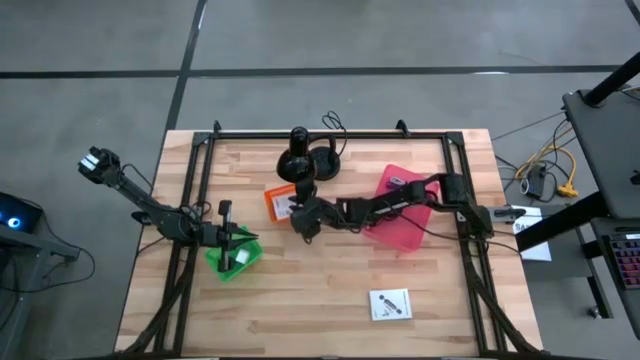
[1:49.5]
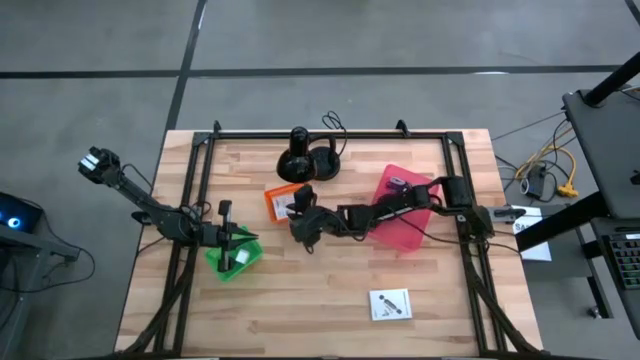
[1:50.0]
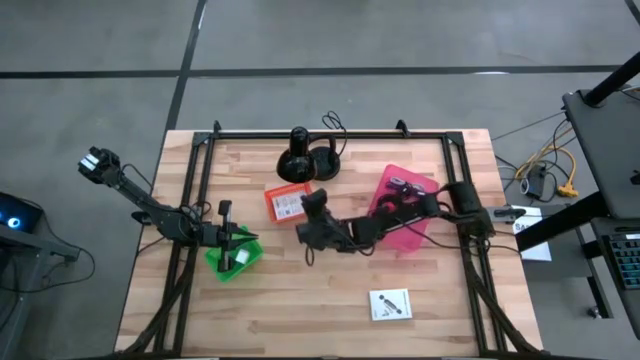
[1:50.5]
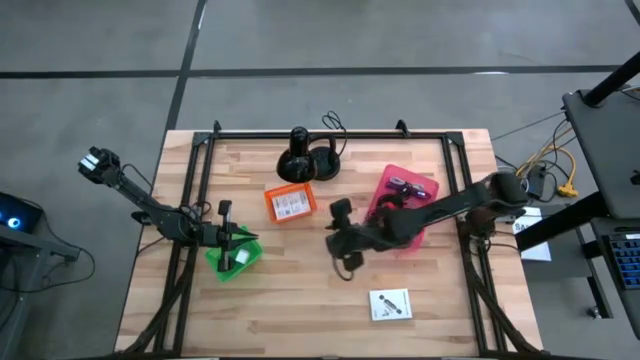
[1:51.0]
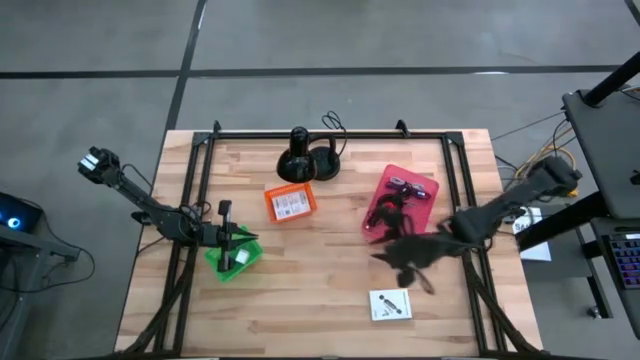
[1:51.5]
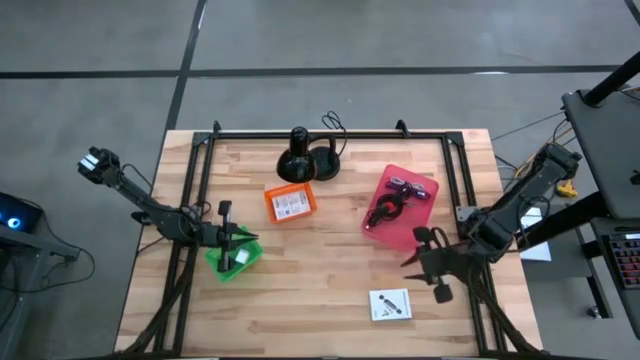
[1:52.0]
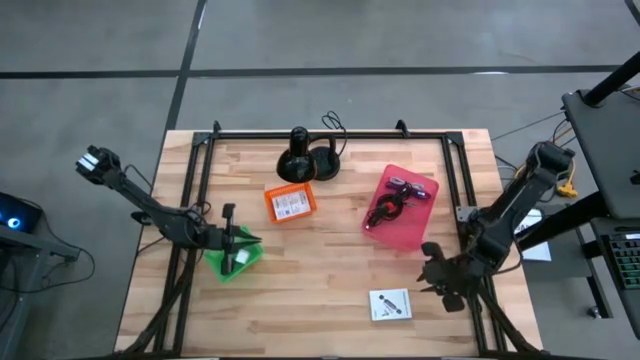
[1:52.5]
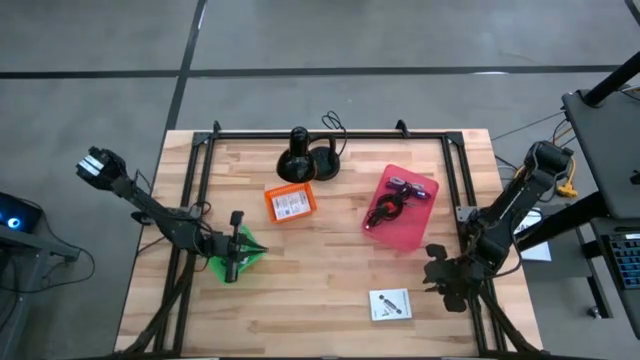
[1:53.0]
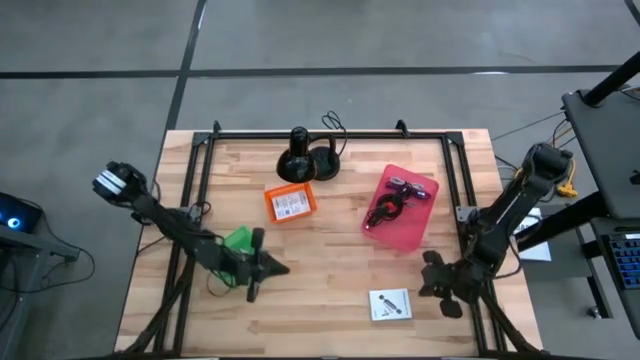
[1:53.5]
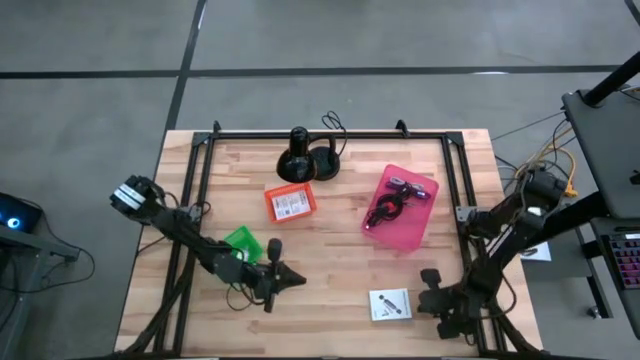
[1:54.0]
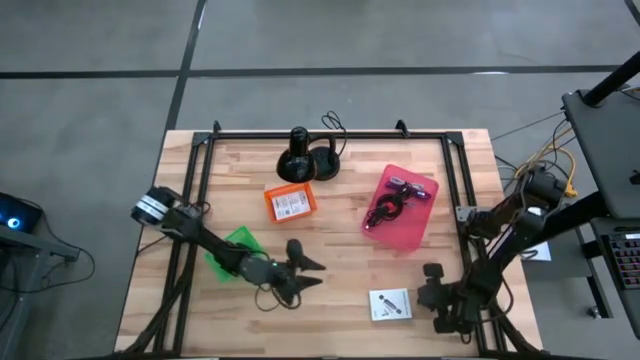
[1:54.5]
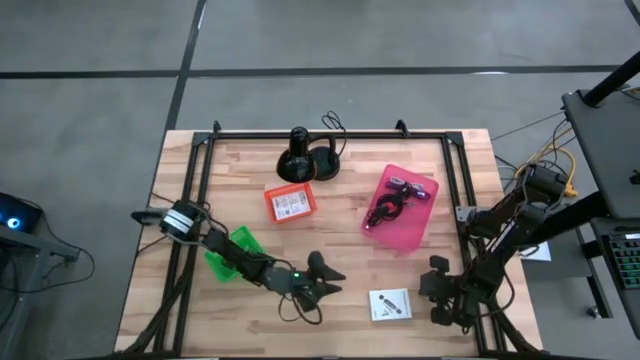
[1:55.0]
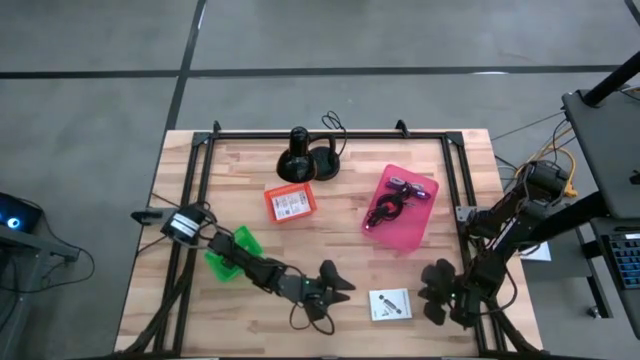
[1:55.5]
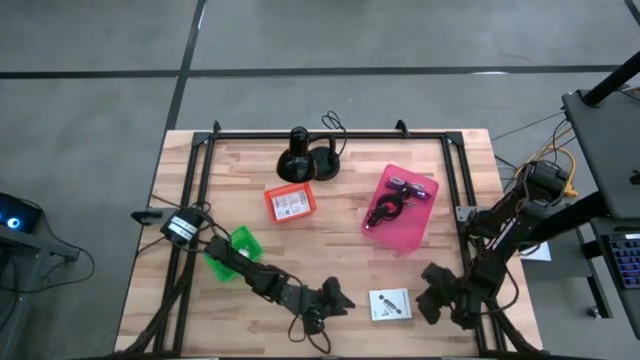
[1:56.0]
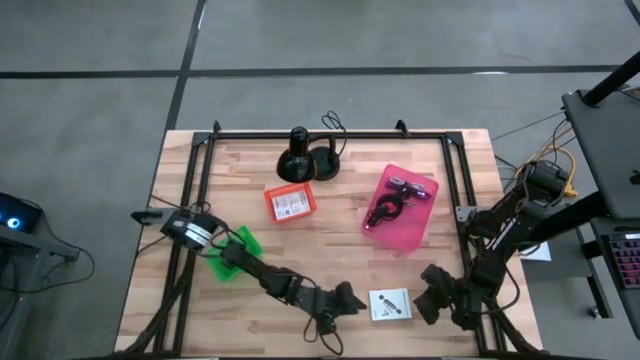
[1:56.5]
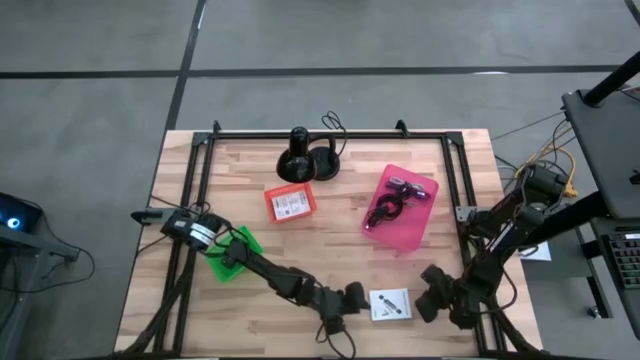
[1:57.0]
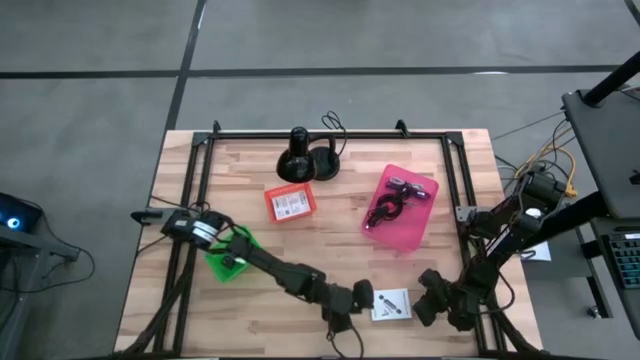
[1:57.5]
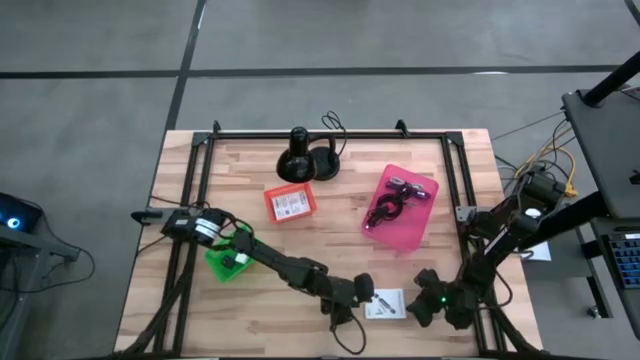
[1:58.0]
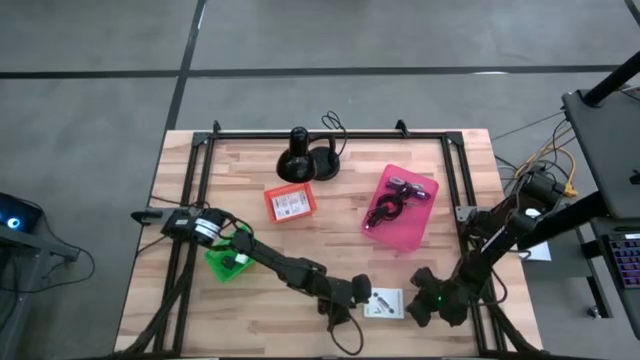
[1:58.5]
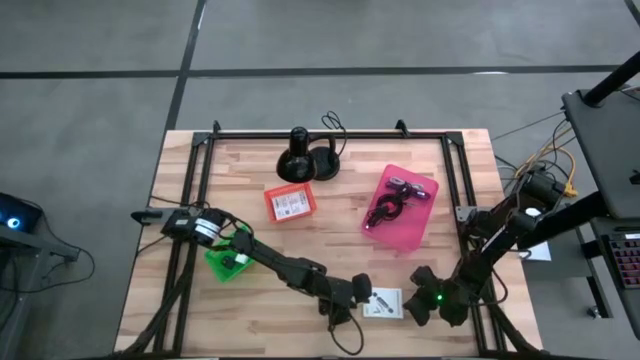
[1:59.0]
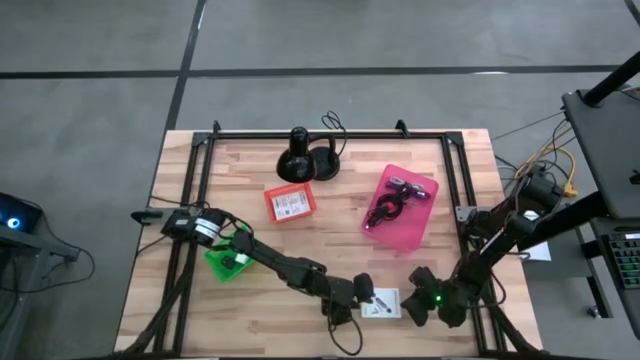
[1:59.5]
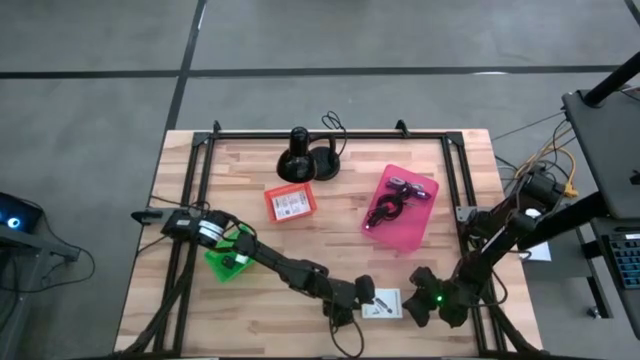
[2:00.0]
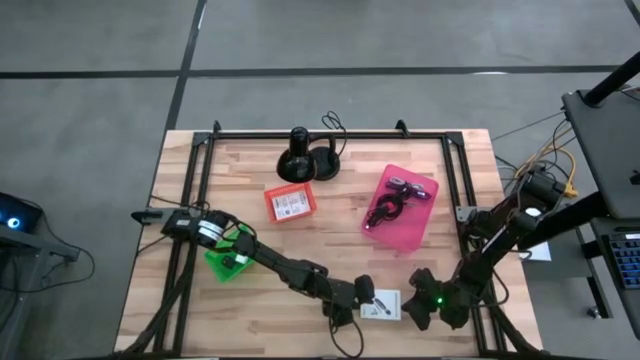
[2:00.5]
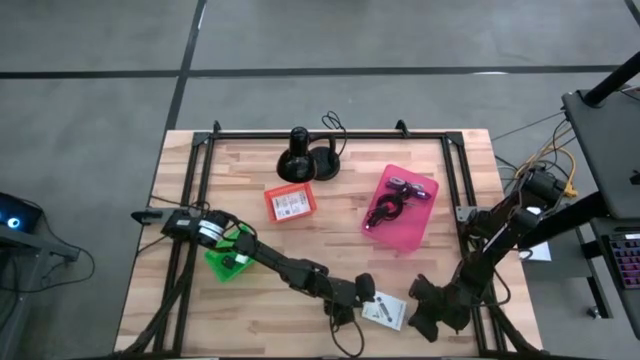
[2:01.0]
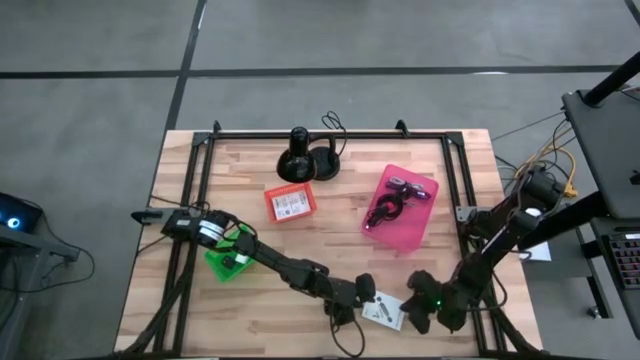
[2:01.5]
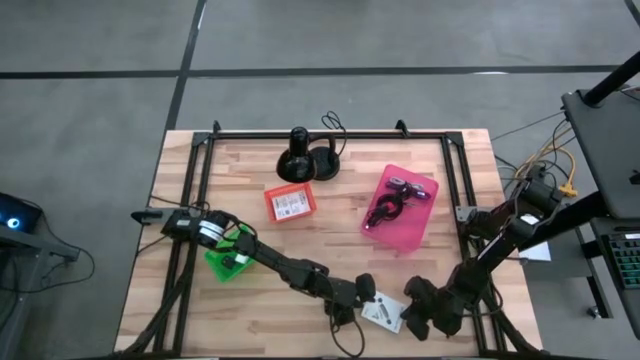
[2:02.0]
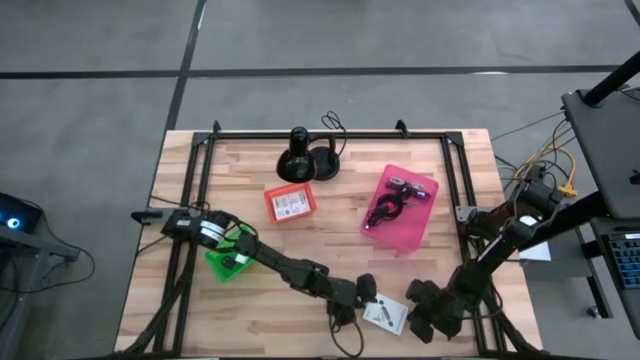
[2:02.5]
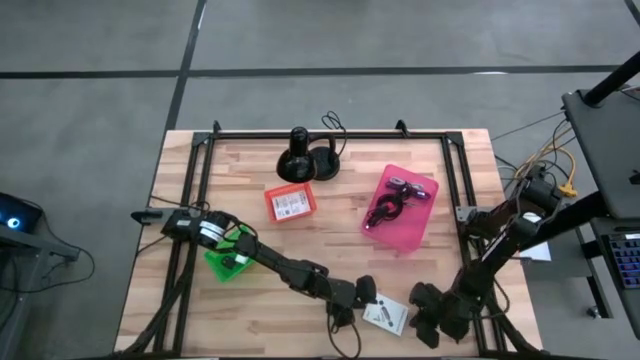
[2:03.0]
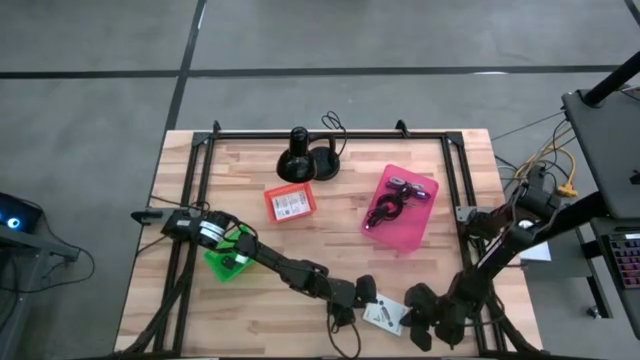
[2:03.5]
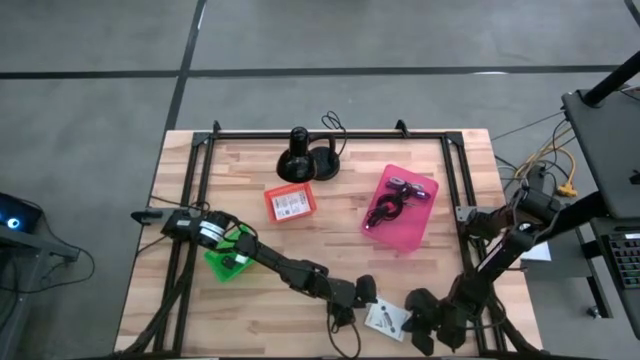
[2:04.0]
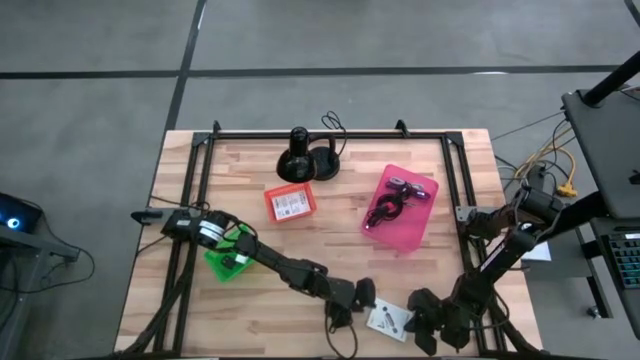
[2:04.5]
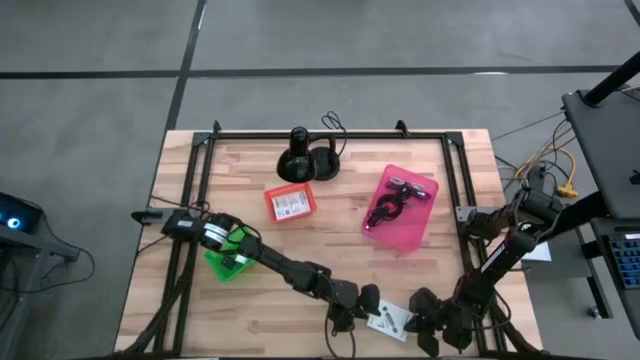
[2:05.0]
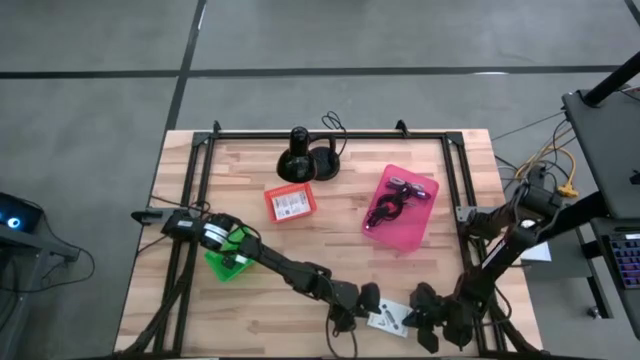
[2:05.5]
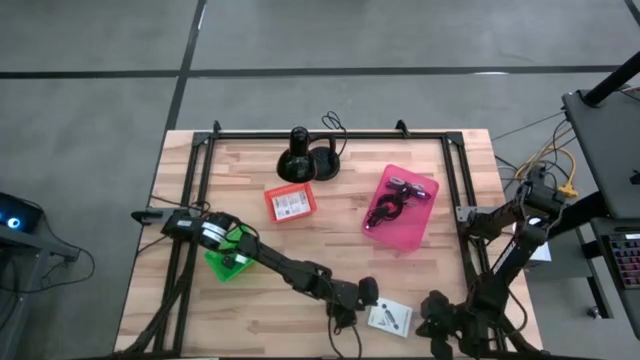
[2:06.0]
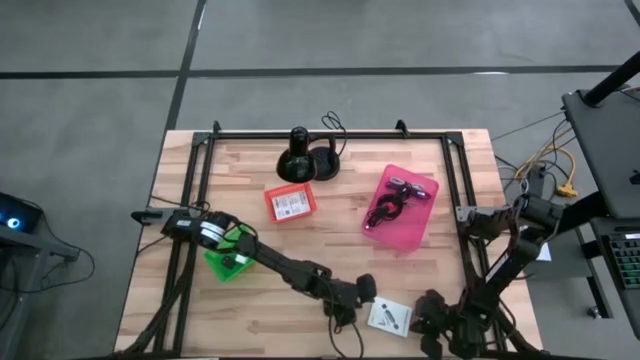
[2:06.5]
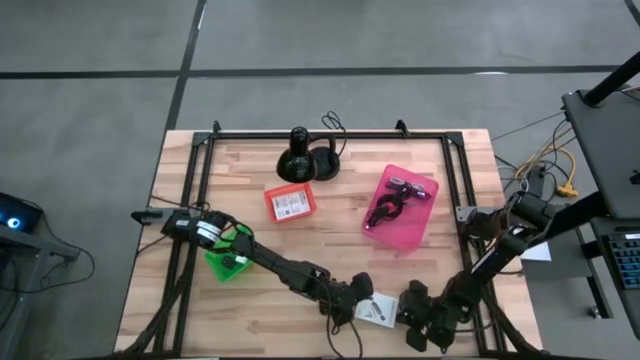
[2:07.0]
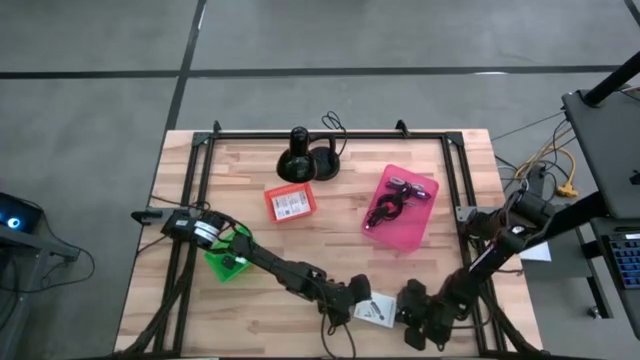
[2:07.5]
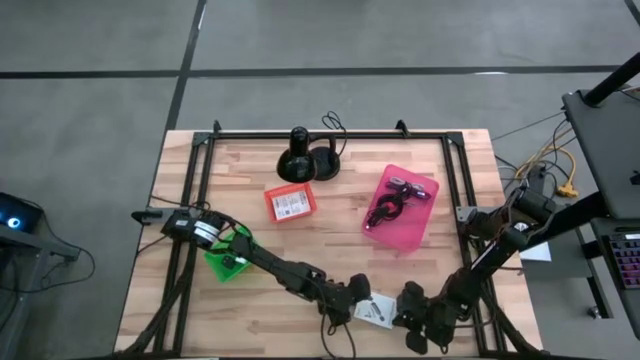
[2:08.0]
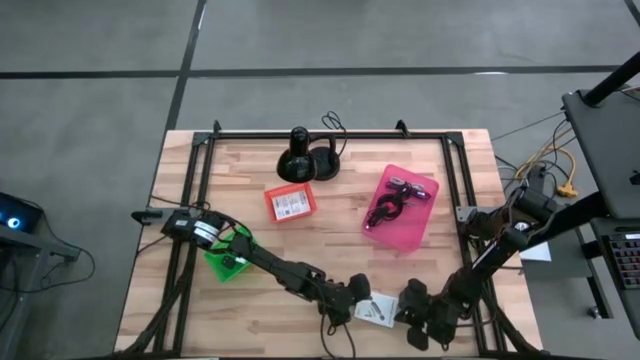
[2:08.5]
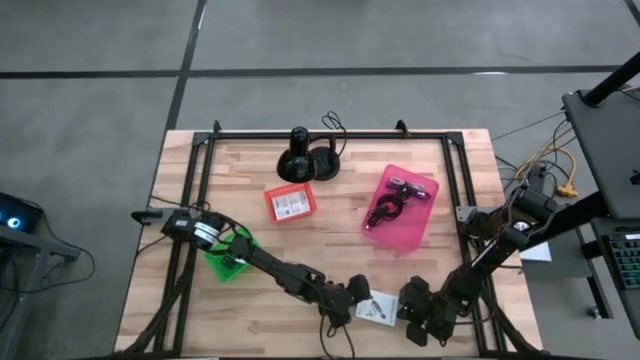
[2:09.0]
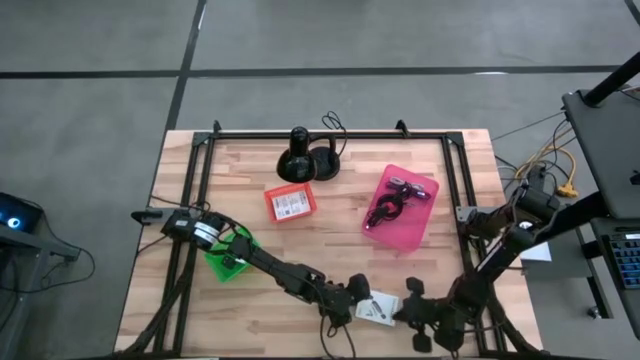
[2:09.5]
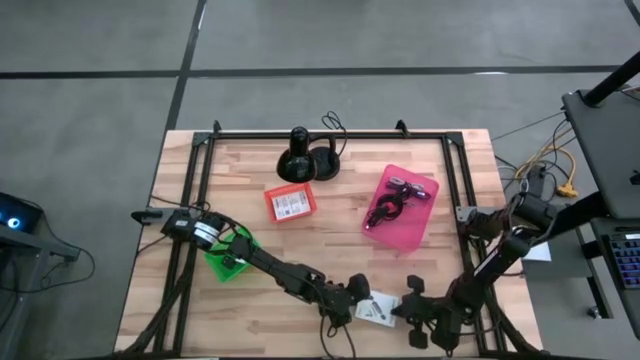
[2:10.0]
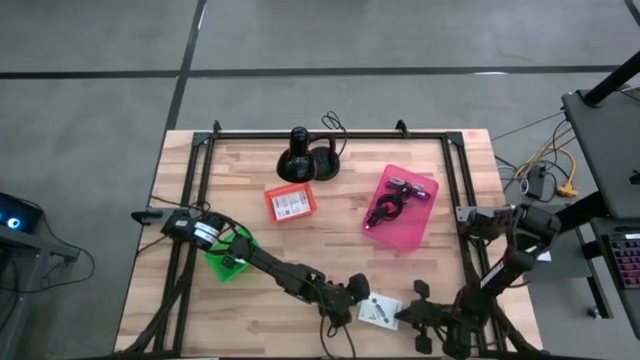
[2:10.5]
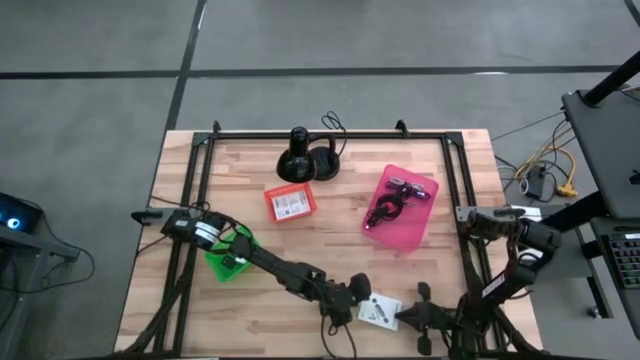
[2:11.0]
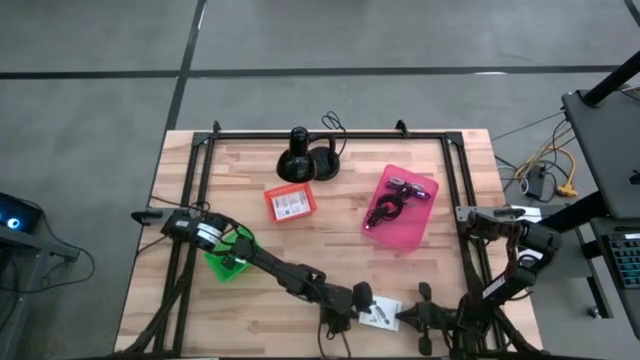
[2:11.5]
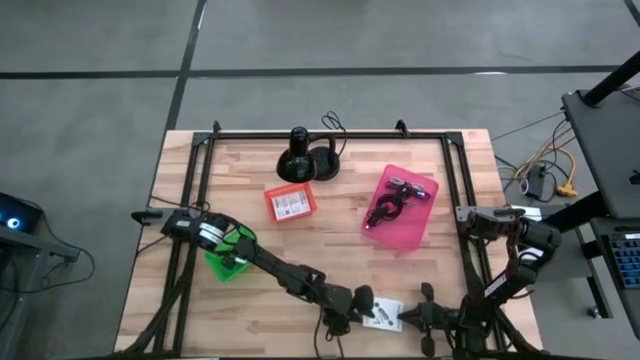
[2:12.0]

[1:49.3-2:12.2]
Task: Pick and place items into bin
Stack the card reader box on top of the card reader box in the orange bin
